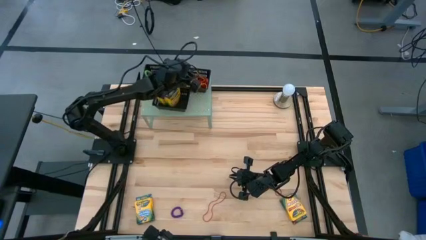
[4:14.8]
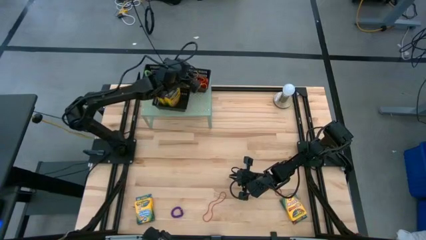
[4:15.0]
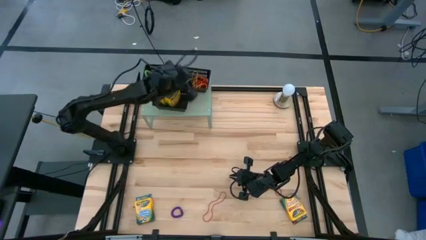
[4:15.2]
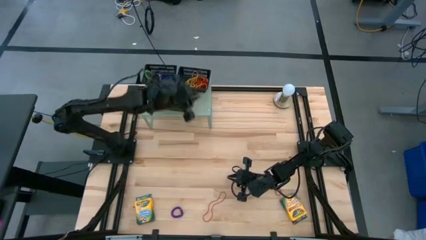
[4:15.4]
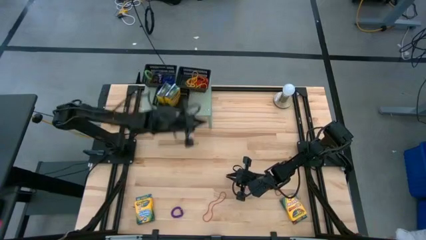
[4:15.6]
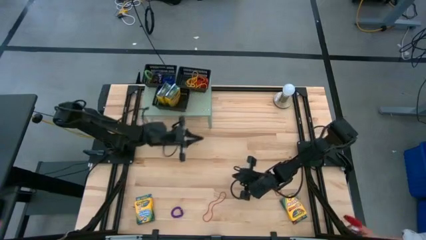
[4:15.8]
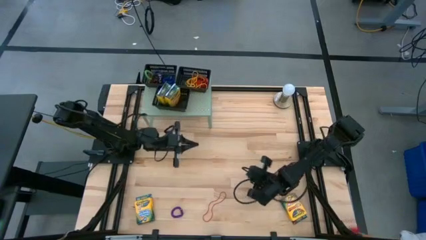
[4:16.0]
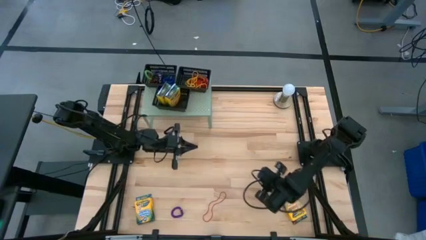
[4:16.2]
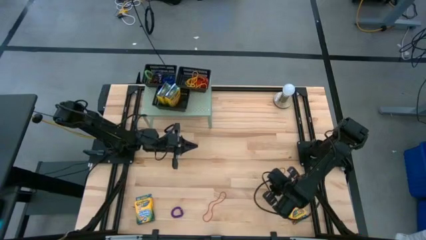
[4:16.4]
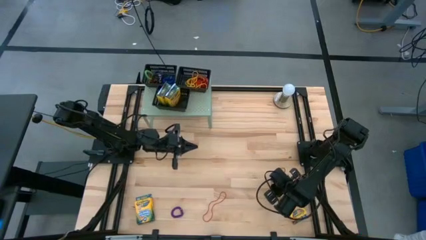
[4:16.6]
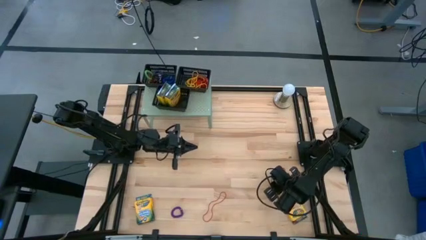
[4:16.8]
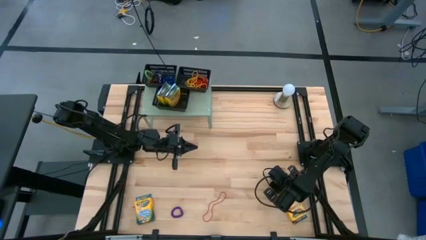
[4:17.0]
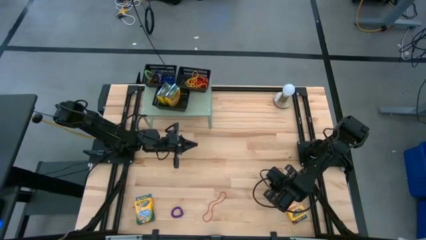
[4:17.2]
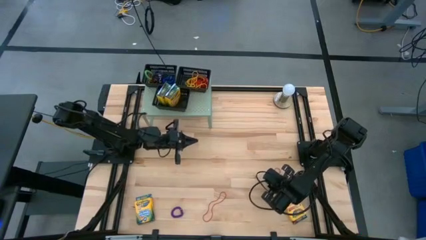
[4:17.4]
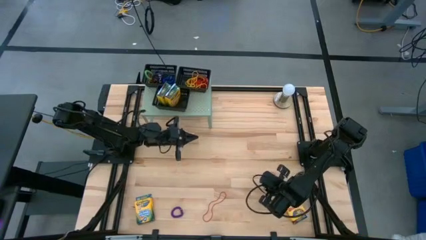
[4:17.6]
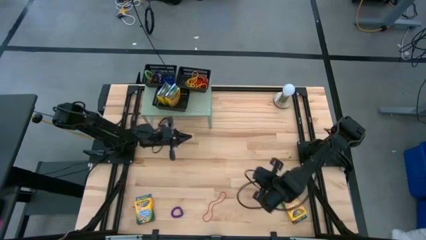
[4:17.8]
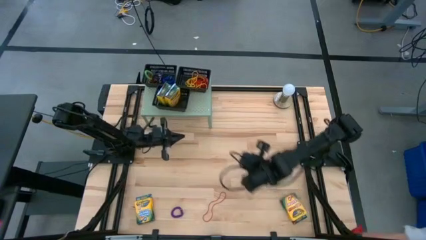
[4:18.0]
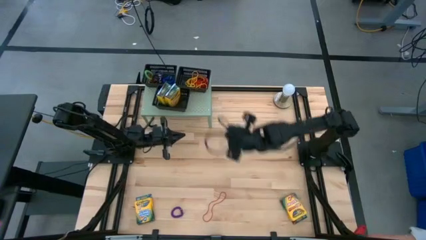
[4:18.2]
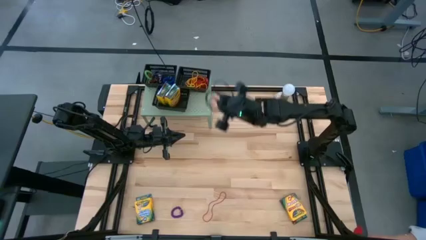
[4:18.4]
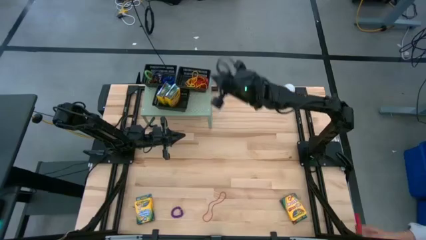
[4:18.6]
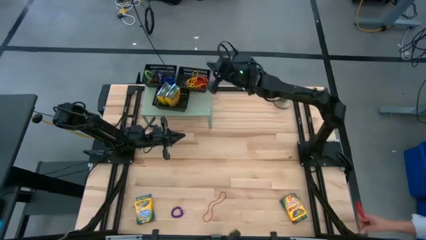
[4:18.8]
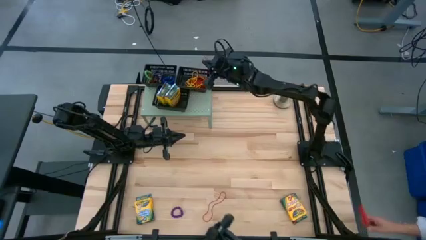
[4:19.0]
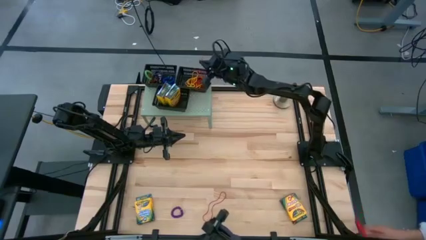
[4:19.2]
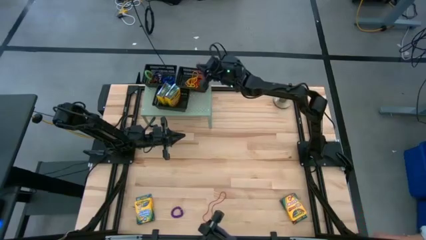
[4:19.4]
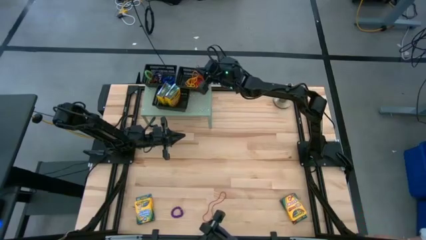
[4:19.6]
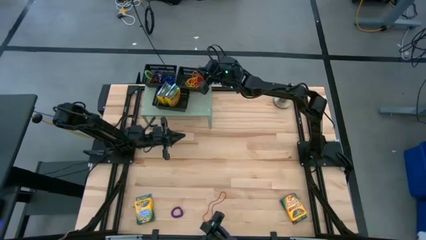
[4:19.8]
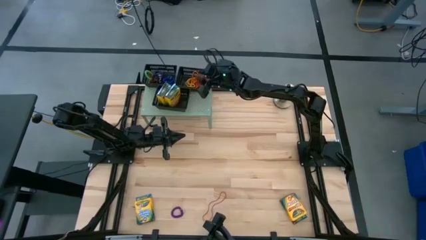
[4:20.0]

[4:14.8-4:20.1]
Task: Pick & Place Office Desk Supplies
Put the red rubber band into the top right black bin

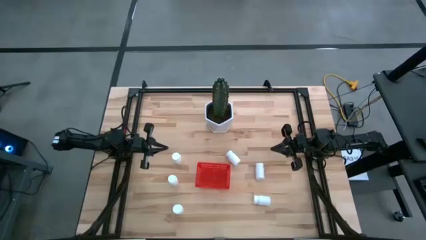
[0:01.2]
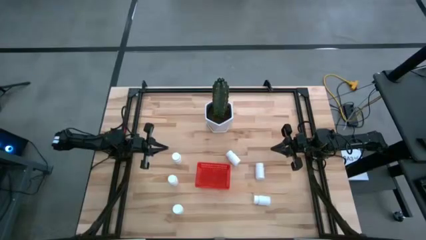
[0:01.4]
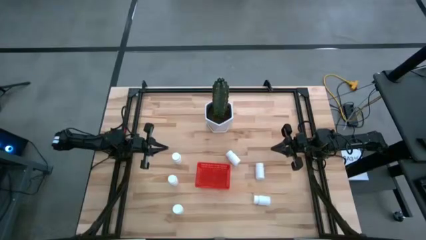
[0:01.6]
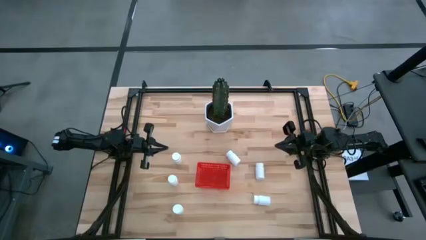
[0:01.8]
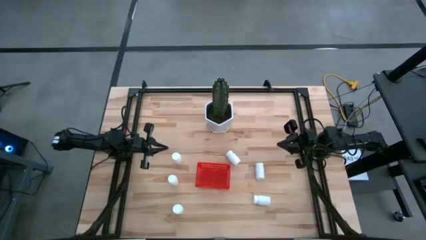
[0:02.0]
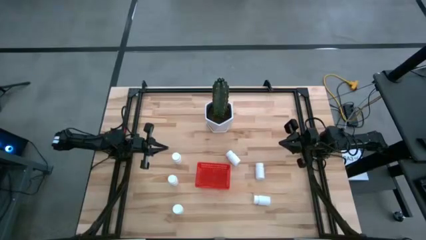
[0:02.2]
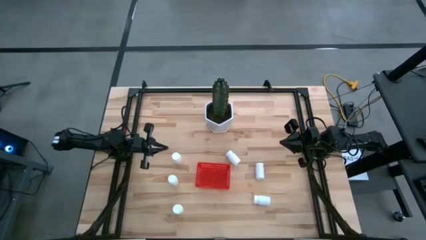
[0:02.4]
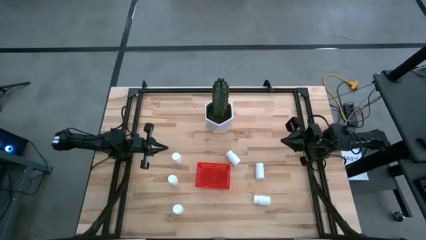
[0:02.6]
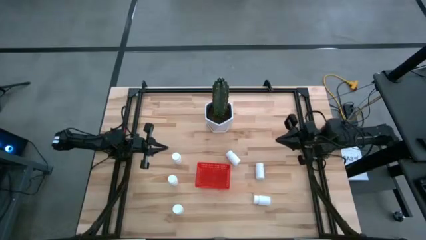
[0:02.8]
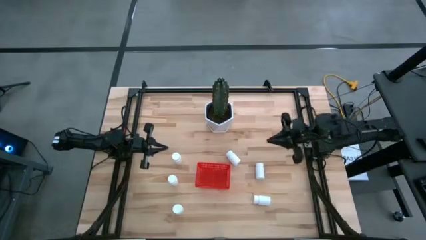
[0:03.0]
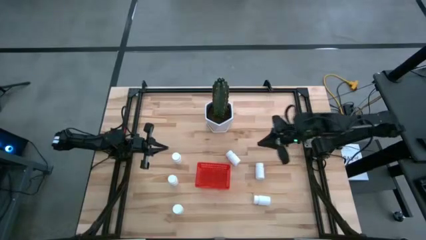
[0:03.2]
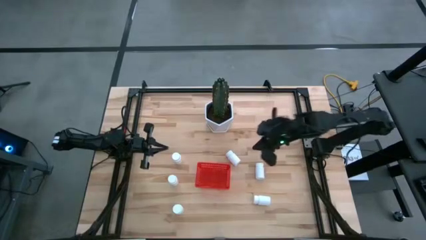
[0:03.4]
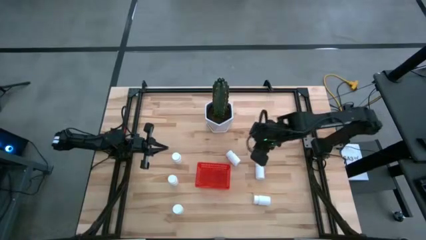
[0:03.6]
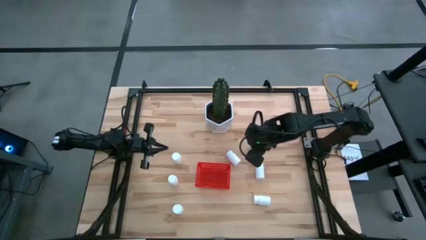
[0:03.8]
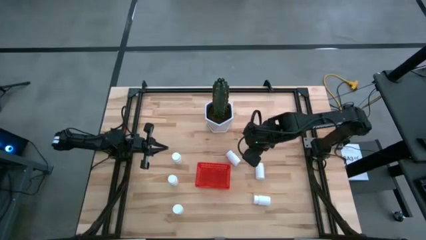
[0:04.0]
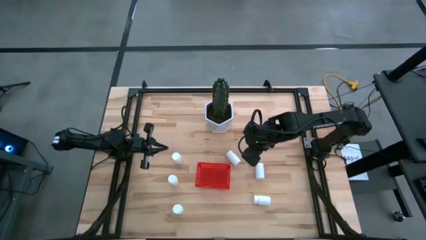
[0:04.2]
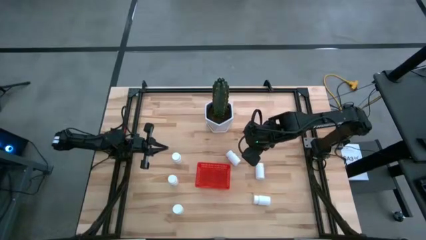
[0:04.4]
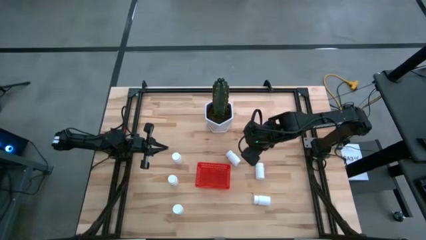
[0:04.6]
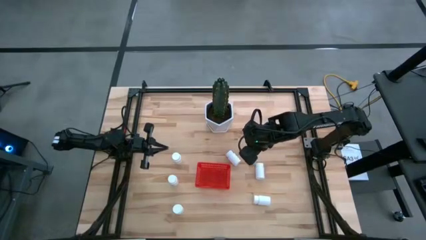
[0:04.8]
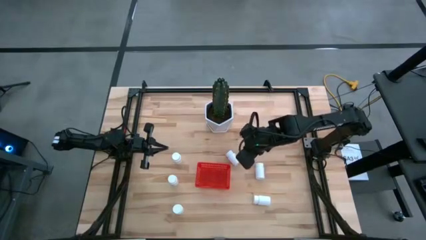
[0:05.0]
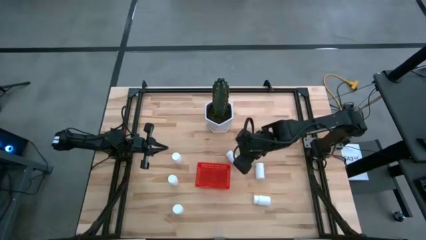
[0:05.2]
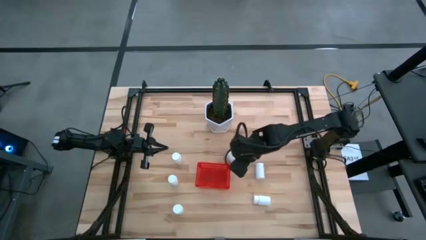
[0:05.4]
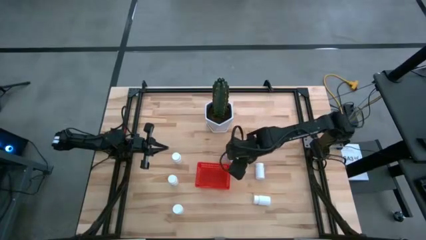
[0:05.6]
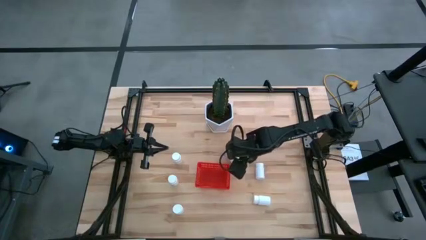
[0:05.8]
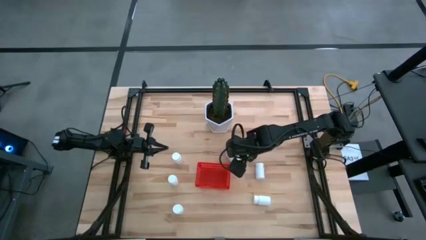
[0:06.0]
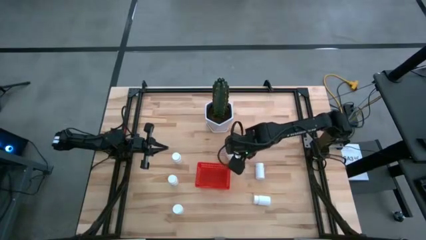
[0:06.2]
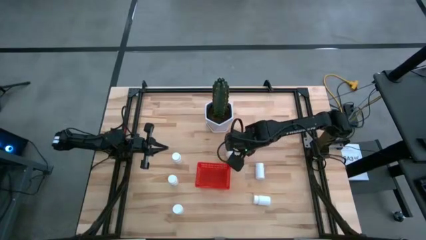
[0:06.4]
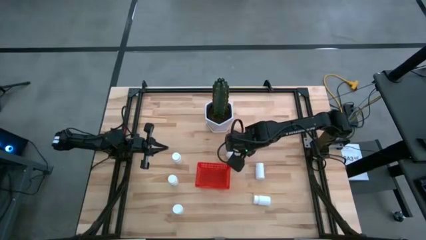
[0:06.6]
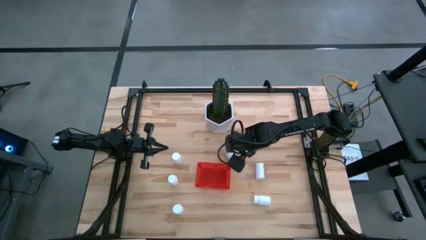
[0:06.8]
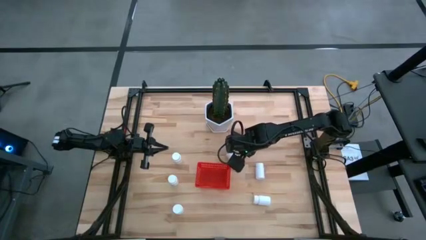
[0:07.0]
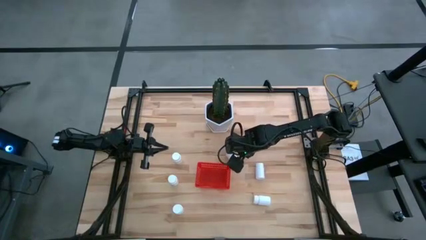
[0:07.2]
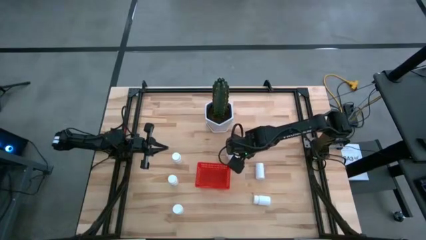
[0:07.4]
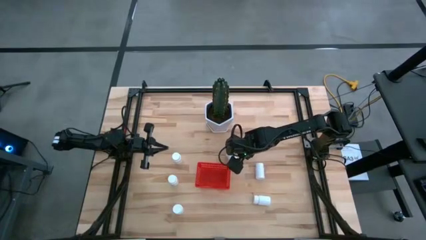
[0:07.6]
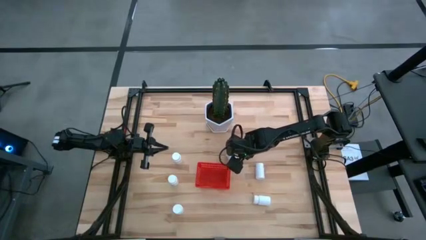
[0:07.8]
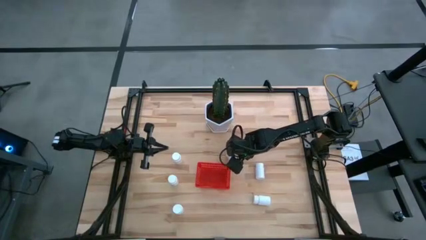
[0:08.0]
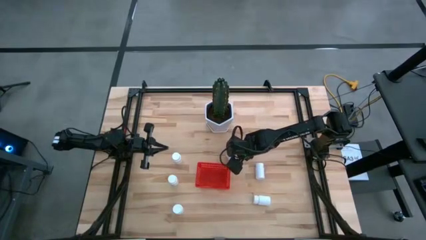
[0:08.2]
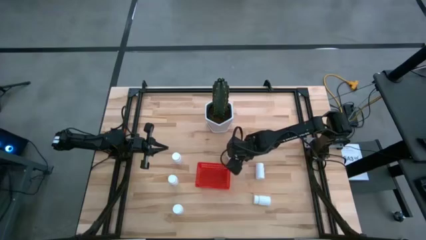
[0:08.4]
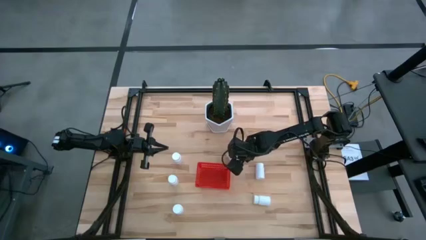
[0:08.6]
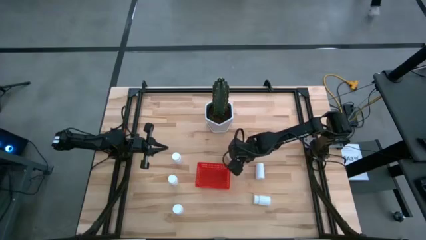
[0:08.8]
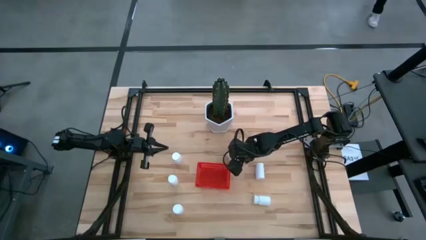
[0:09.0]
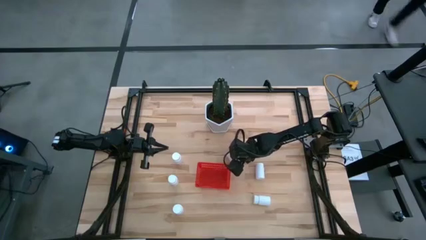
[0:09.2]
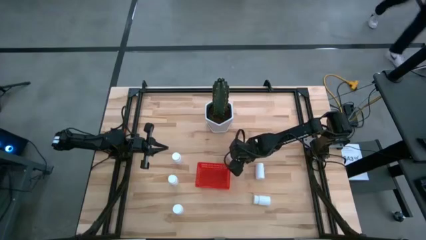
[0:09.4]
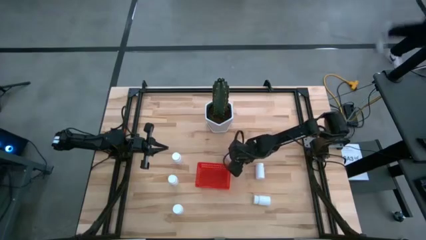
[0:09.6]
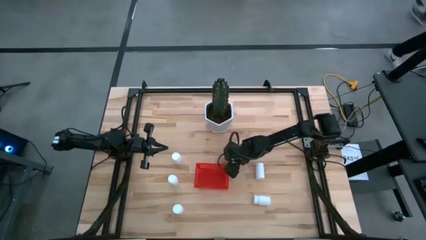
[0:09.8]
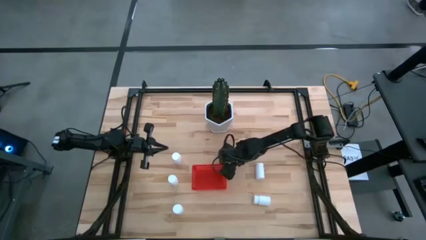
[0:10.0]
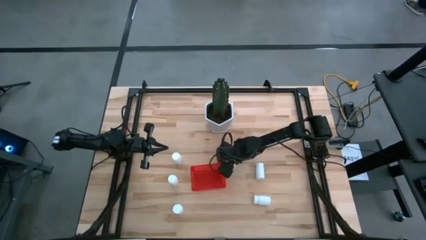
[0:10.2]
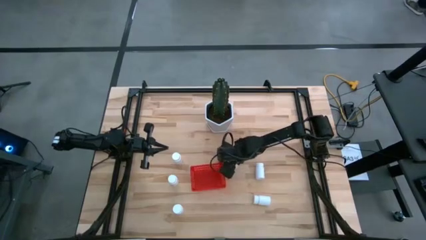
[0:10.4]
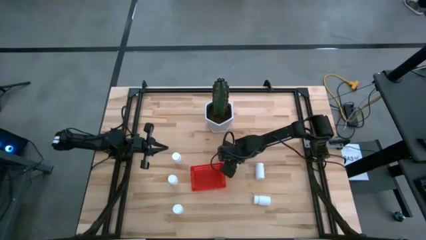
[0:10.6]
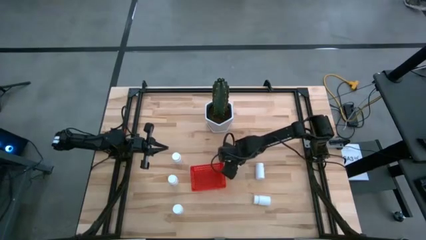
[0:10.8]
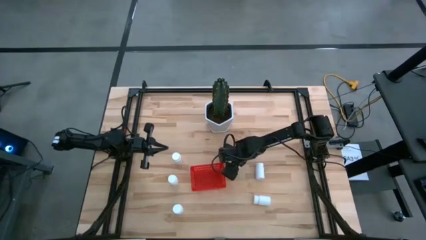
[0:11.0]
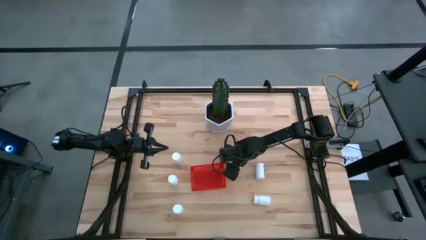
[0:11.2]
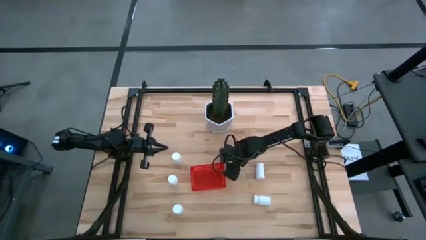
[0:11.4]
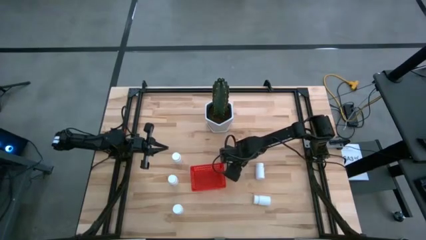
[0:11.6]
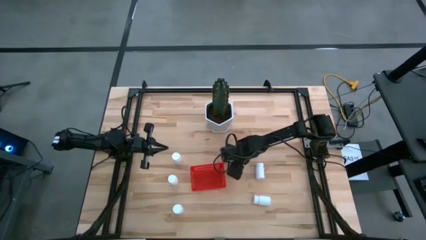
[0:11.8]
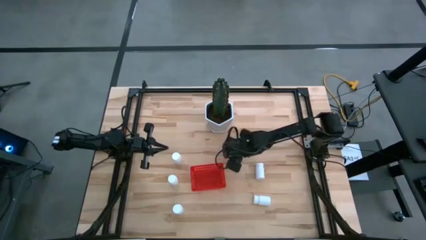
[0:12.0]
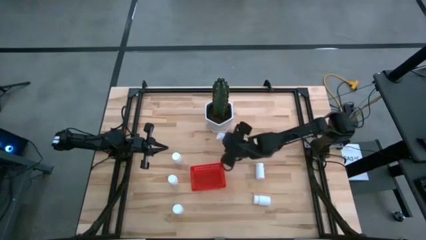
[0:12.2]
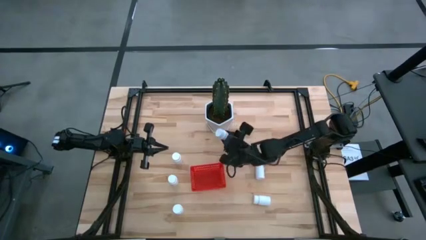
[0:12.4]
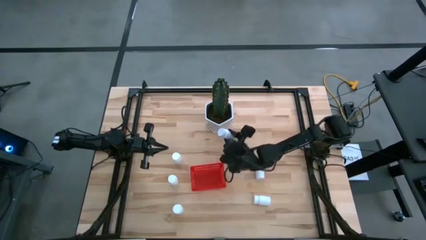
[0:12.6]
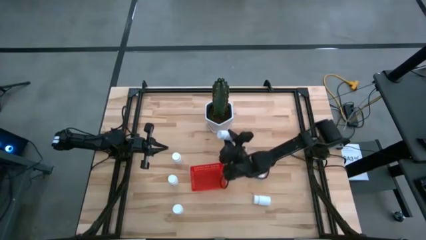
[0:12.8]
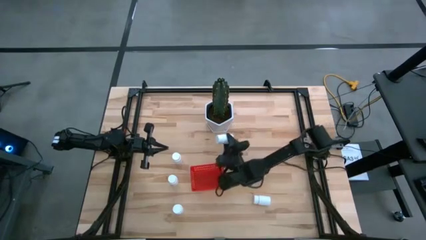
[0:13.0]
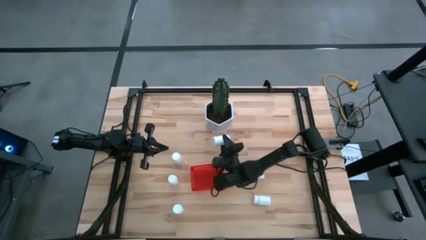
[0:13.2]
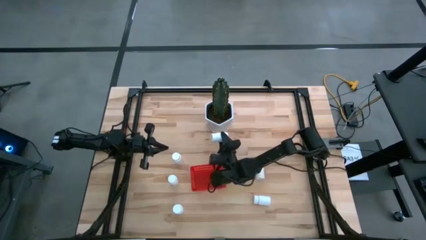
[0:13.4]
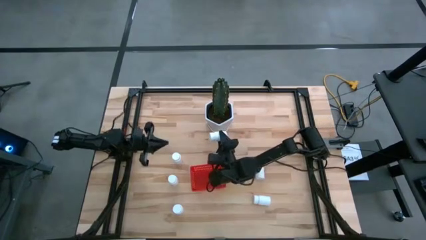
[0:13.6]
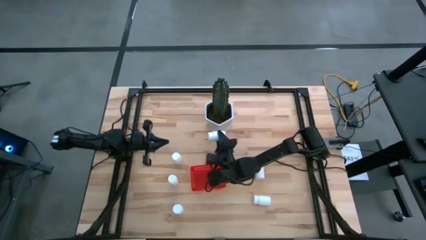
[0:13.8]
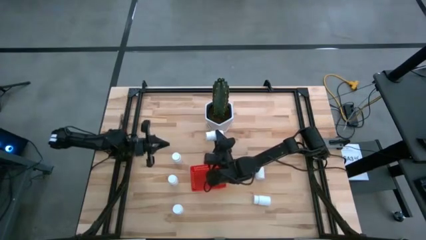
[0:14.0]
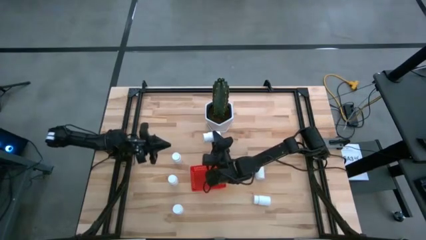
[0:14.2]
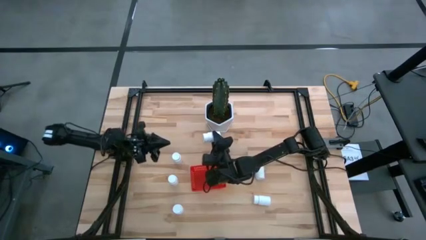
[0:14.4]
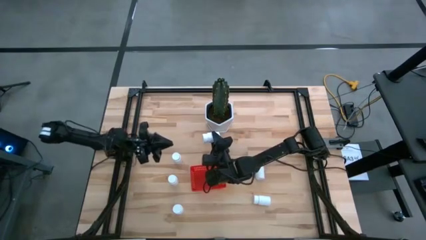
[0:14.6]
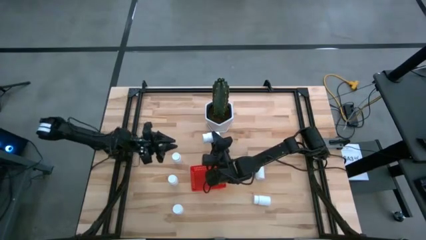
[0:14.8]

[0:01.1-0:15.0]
Task: Pick and place pill bottles into a basket
Put the white pill bottle into the red bin
